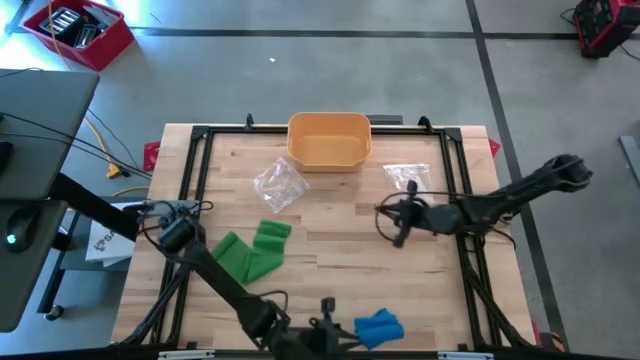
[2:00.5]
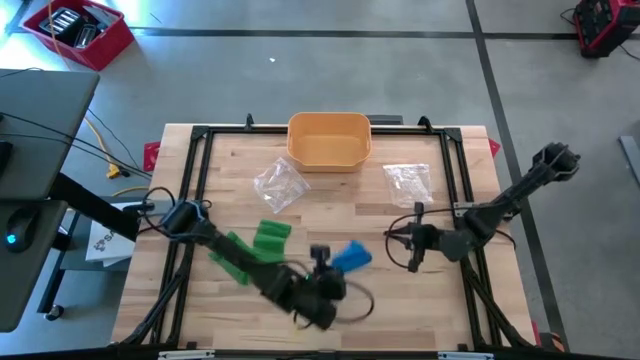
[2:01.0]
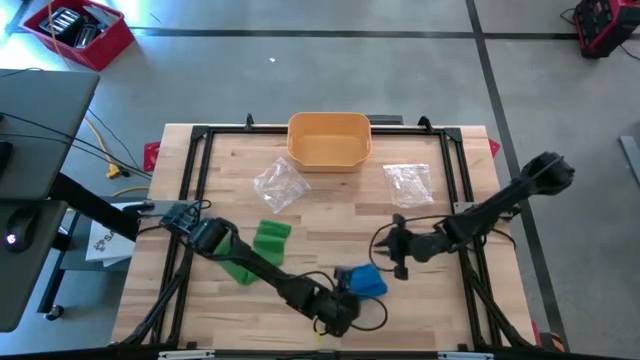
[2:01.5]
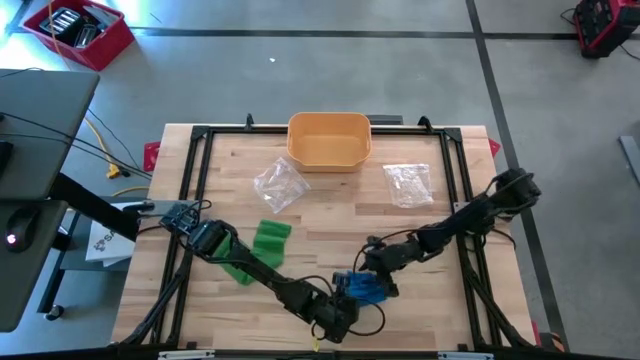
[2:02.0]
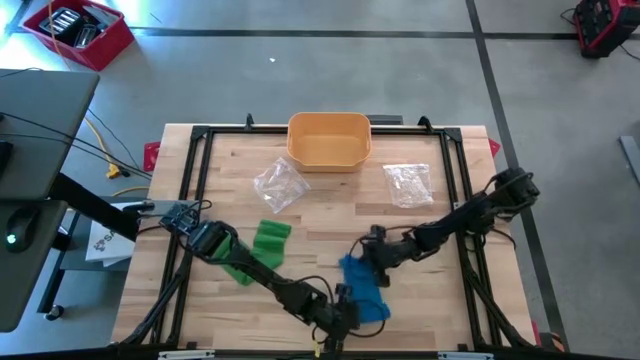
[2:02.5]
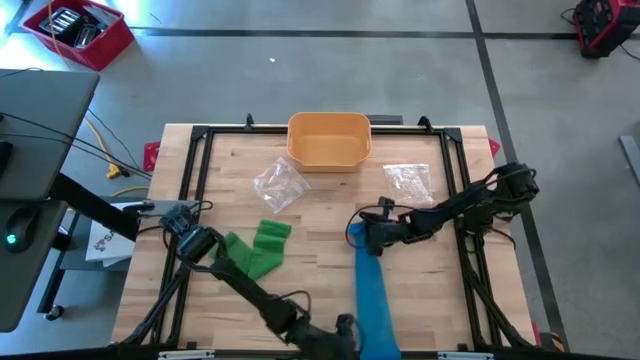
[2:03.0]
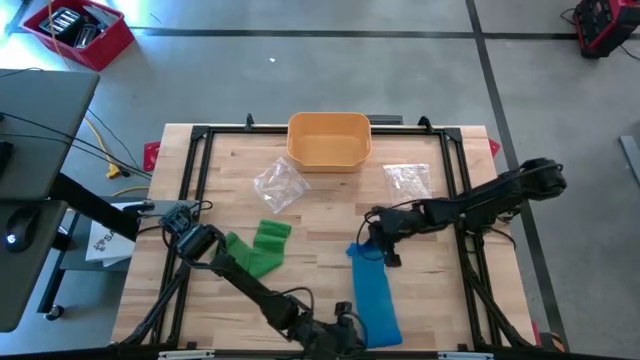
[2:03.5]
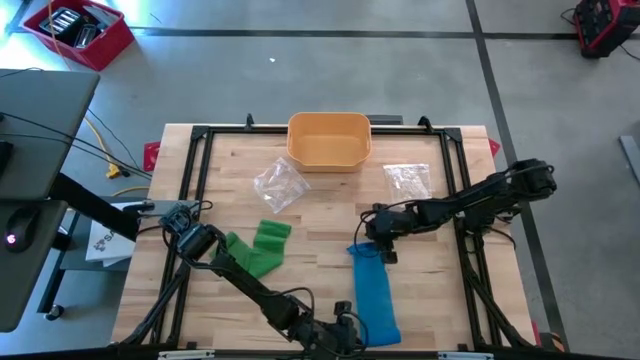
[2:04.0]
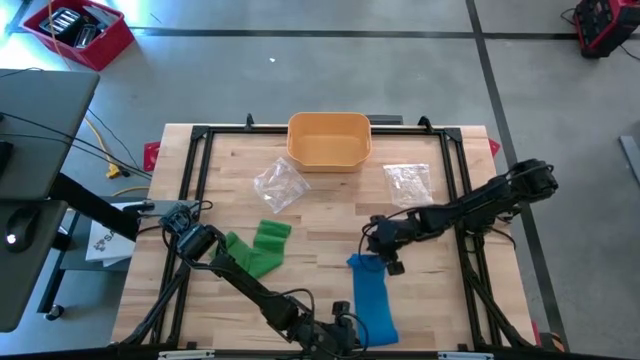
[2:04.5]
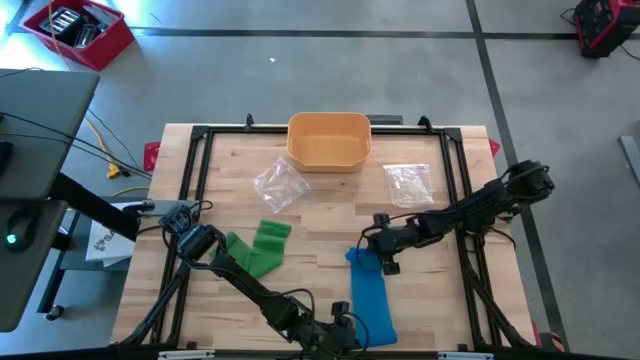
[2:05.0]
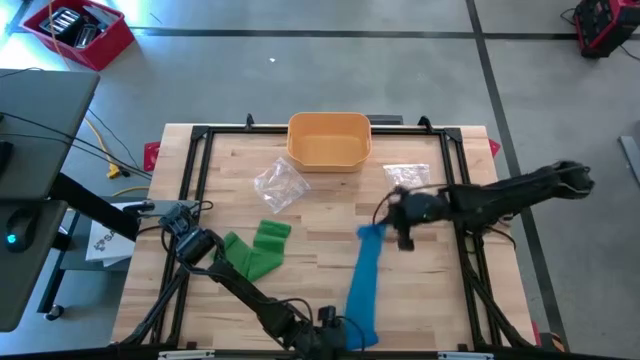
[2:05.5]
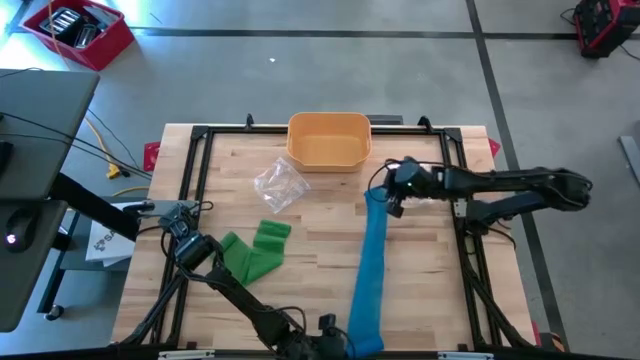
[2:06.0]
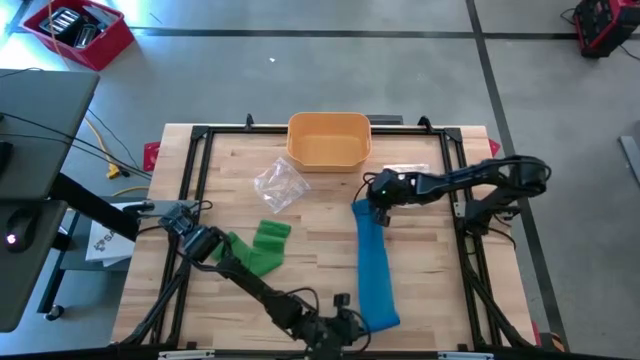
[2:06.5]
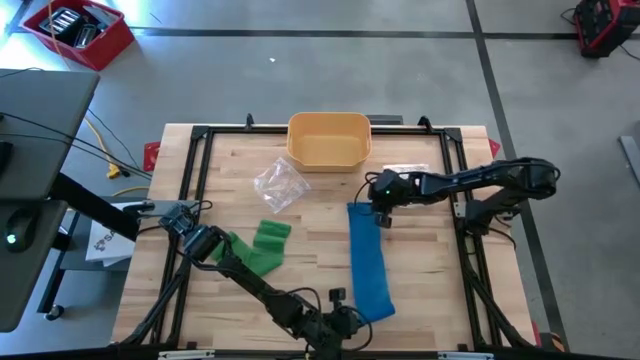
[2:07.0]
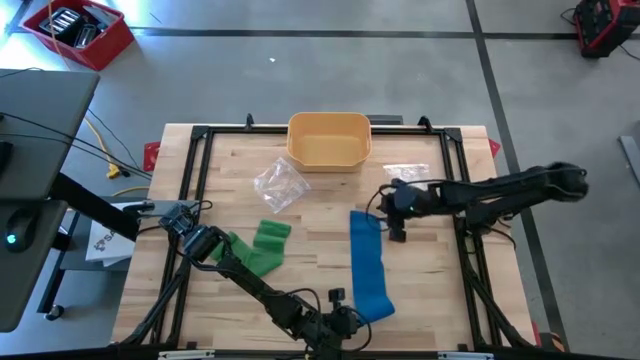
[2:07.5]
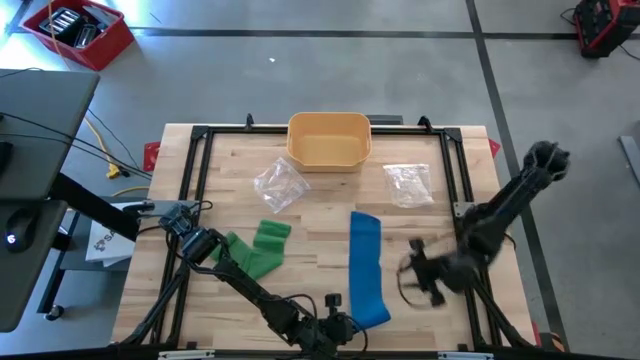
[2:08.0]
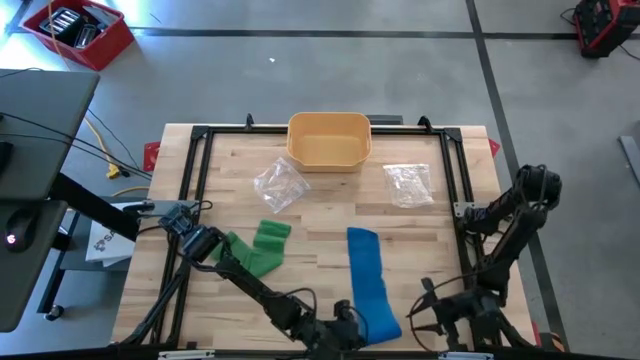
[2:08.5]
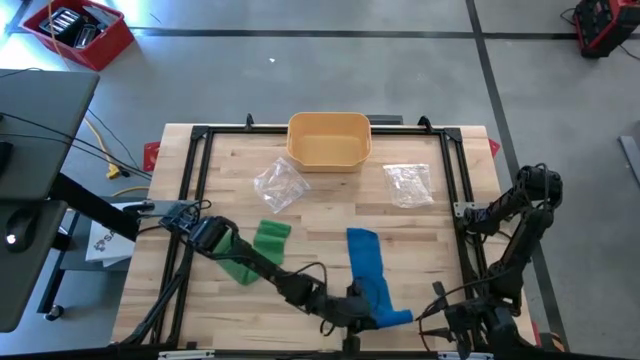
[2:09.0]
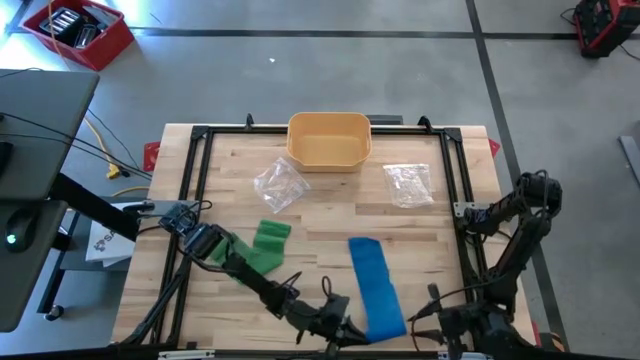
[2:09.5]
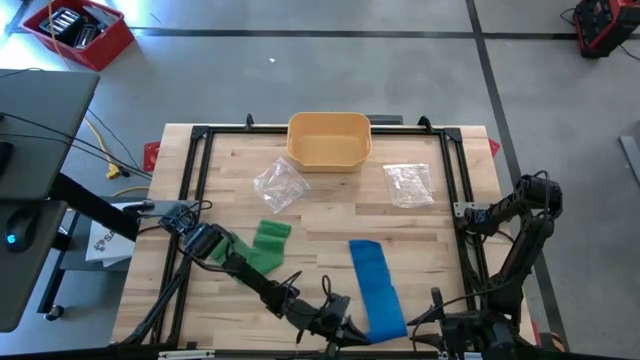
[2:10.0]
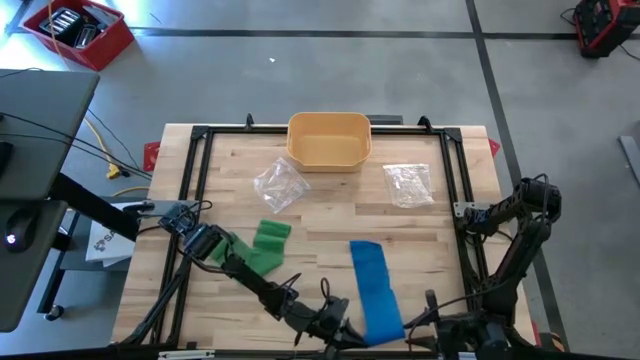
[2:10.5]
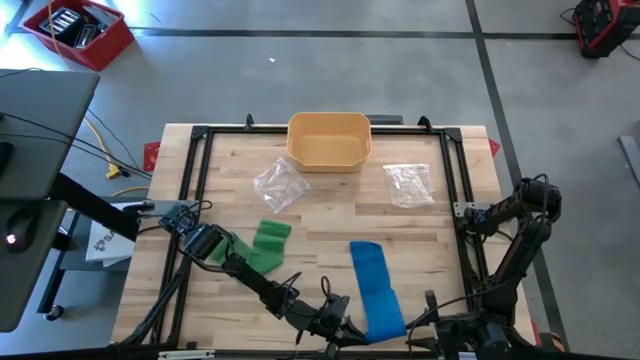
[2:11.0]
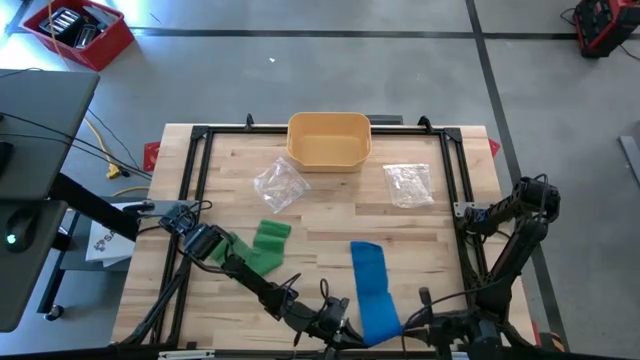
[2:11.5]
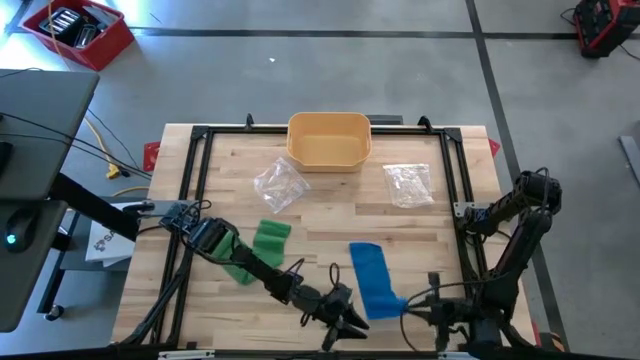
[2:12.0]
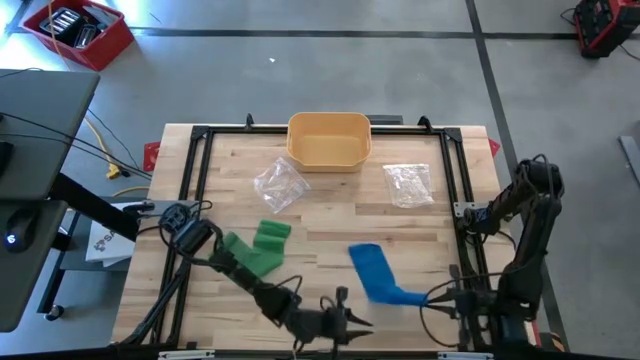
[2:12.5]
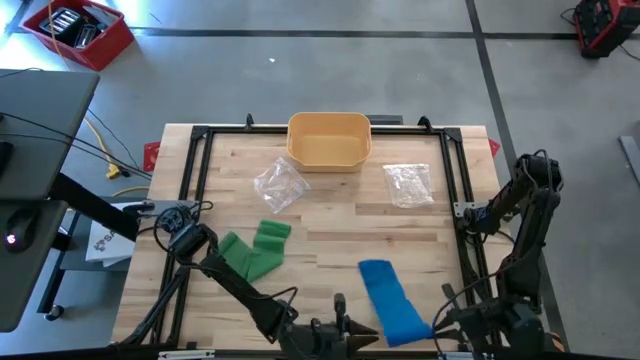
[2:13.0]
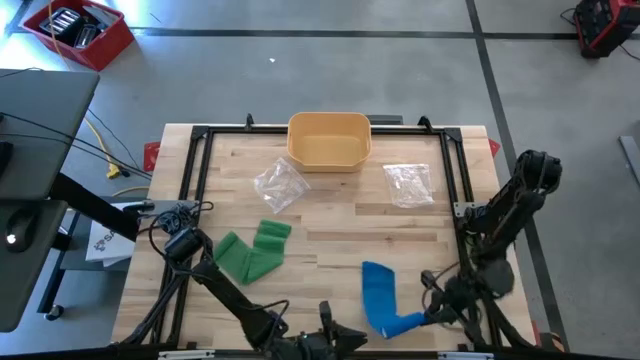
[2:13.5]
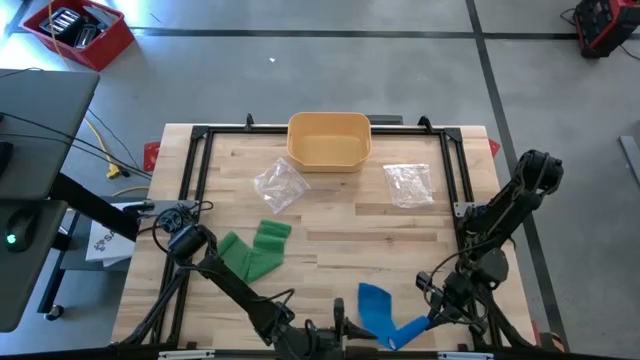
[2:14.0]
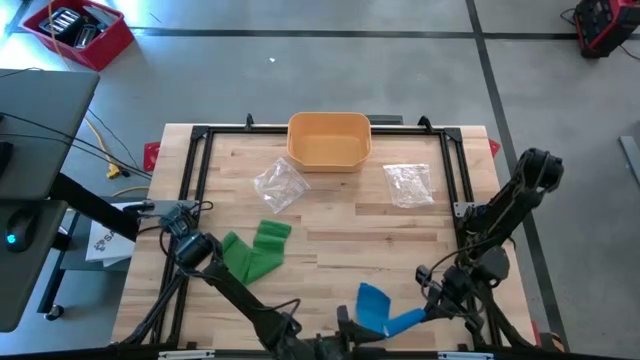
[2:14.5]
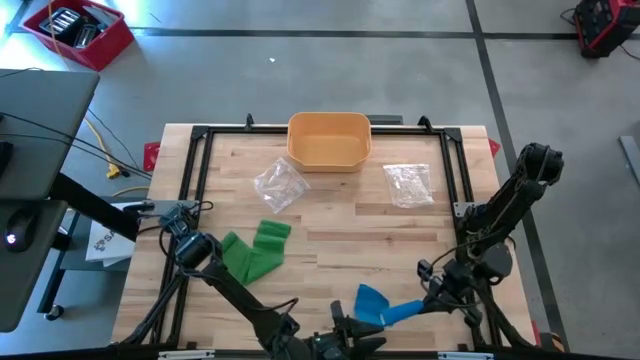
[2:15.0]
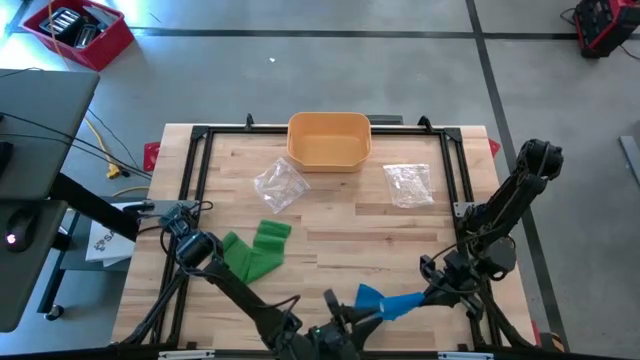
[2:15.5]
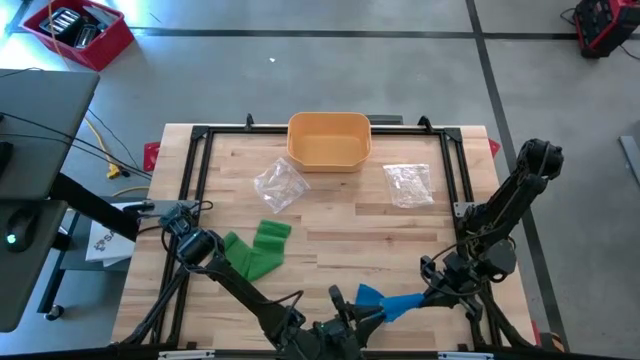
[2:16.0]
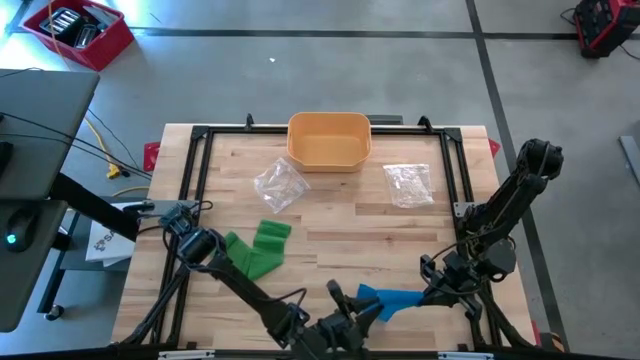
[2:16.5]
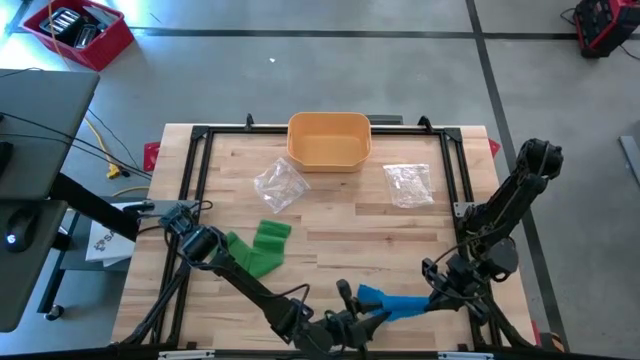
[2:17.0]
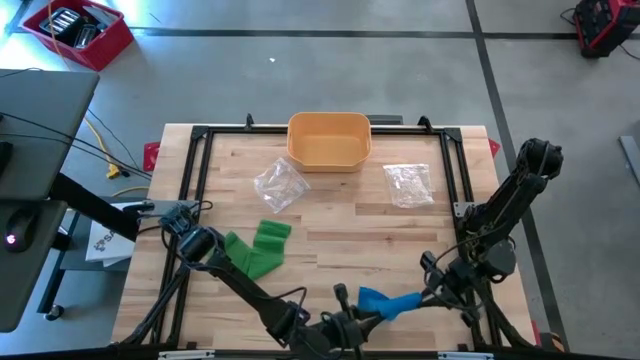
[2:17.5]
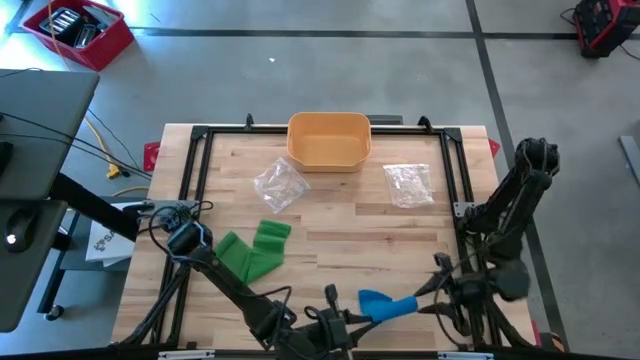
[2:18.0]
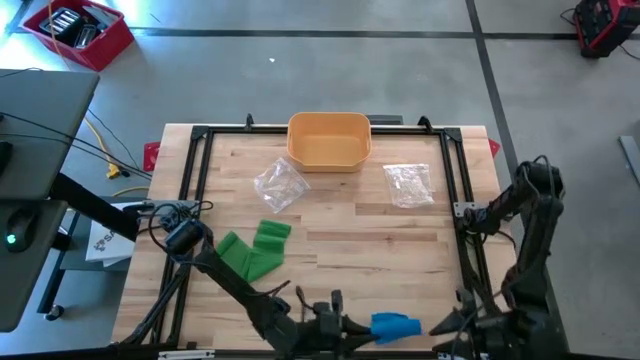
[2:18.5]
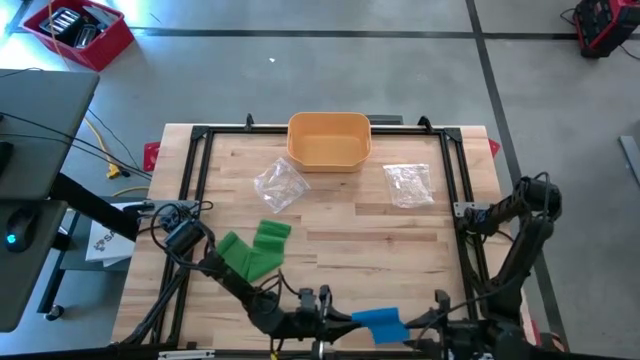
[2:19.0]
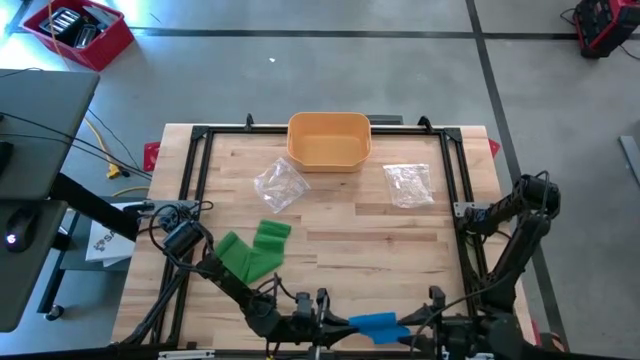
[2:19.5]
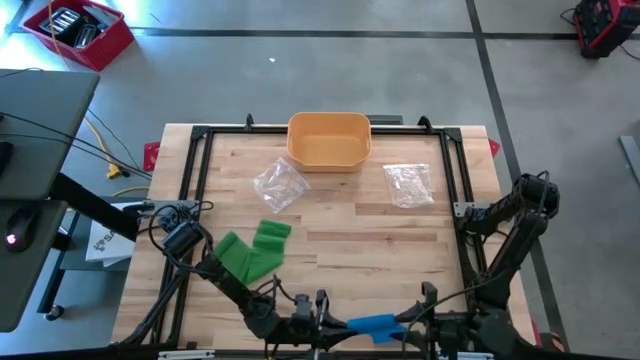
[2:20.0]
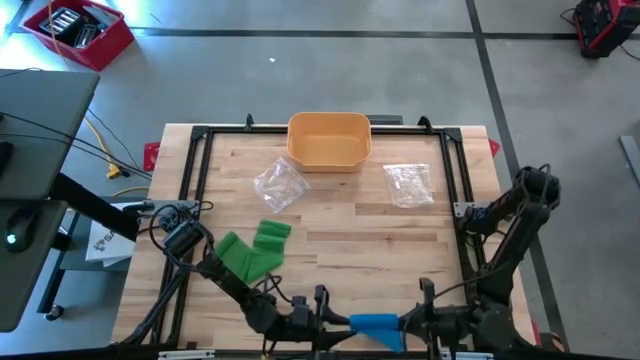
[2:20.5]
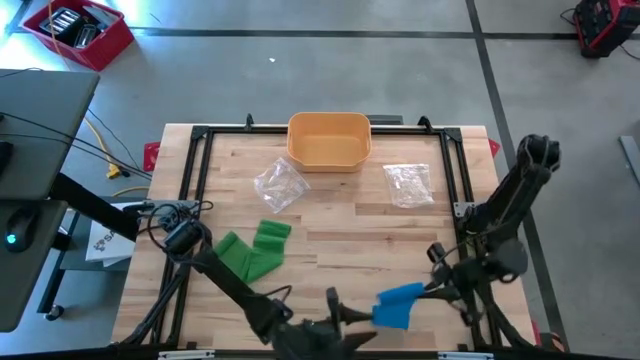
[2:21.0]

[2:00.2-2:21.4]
Task: Roll bandage
Roll the blue bandage
